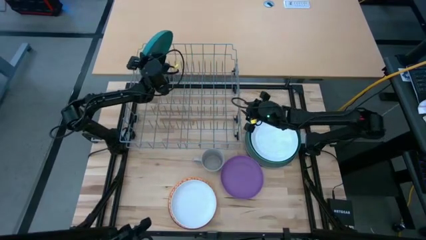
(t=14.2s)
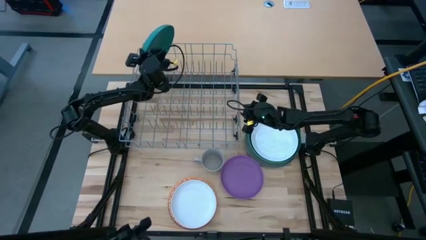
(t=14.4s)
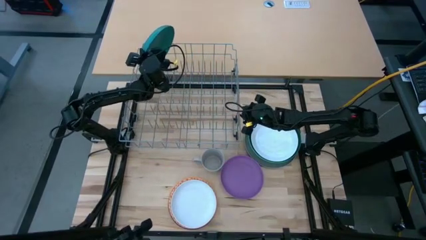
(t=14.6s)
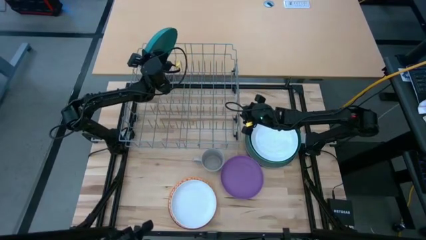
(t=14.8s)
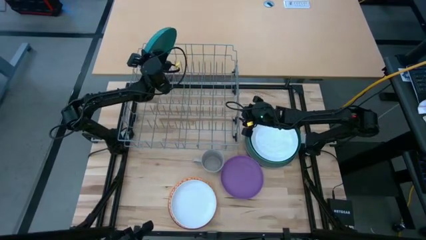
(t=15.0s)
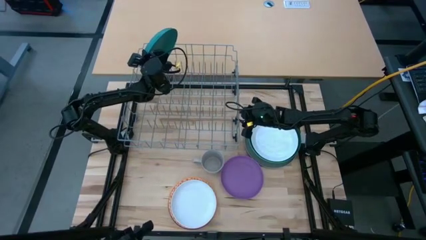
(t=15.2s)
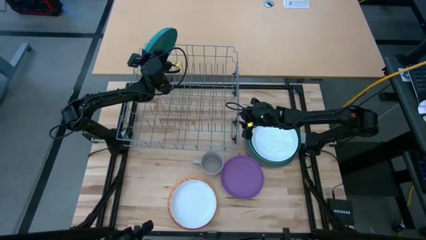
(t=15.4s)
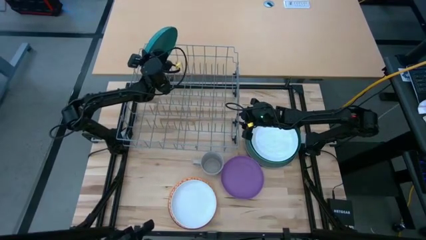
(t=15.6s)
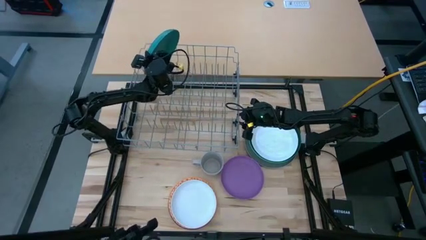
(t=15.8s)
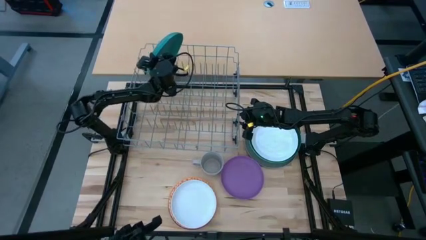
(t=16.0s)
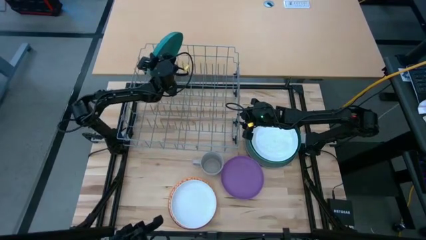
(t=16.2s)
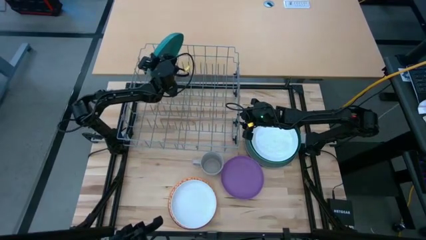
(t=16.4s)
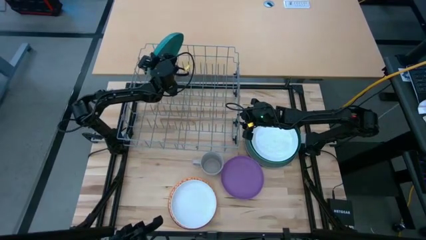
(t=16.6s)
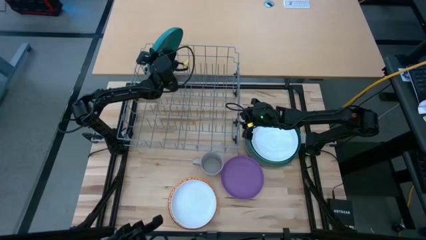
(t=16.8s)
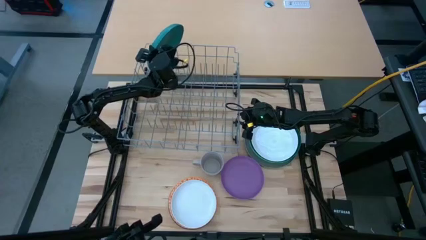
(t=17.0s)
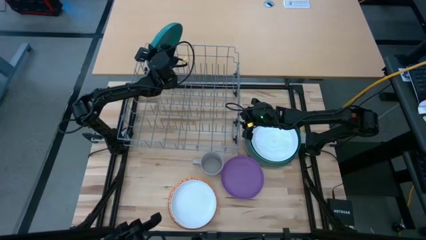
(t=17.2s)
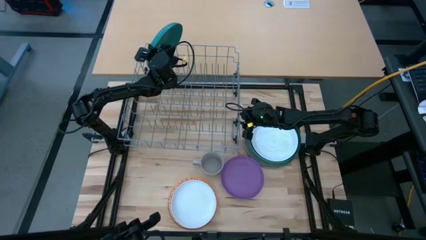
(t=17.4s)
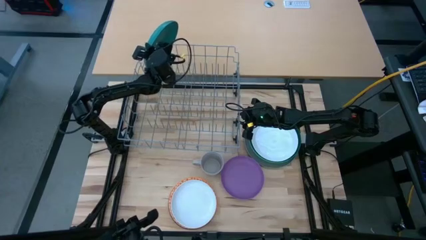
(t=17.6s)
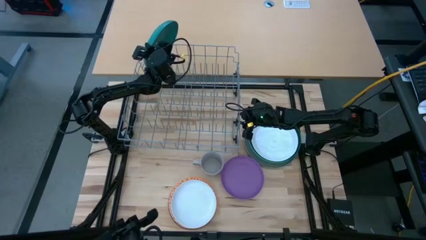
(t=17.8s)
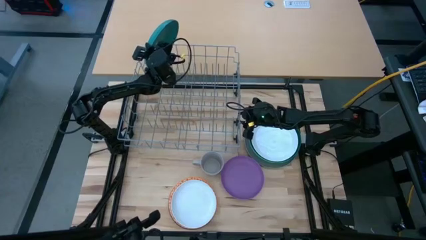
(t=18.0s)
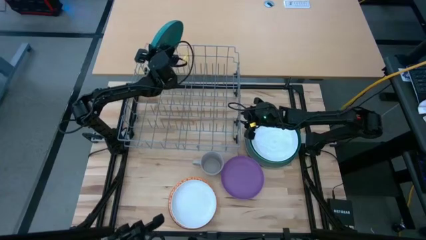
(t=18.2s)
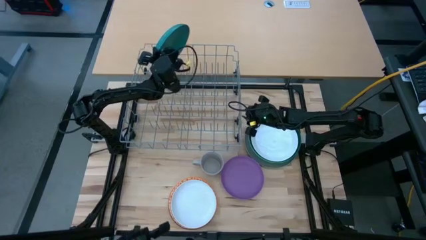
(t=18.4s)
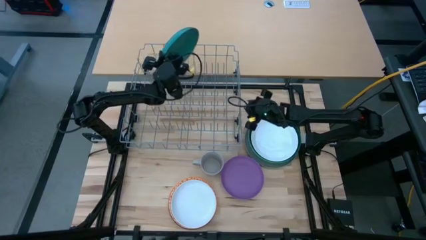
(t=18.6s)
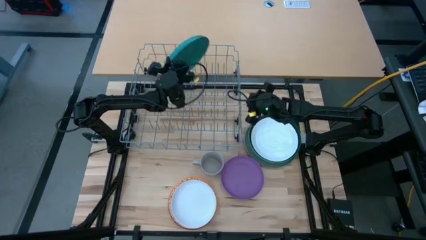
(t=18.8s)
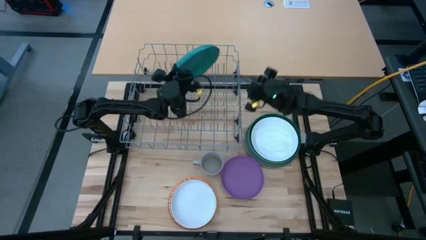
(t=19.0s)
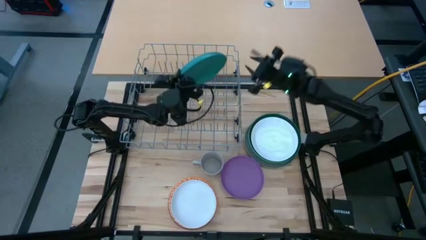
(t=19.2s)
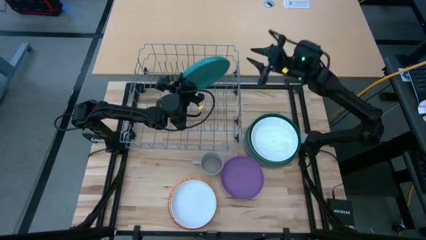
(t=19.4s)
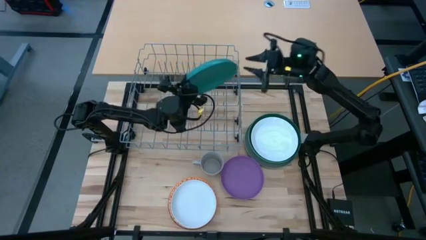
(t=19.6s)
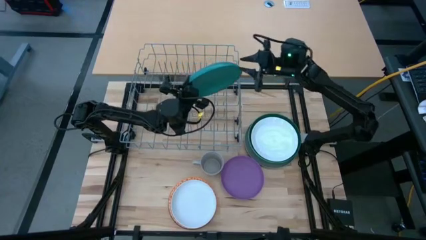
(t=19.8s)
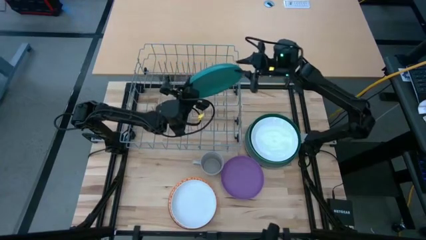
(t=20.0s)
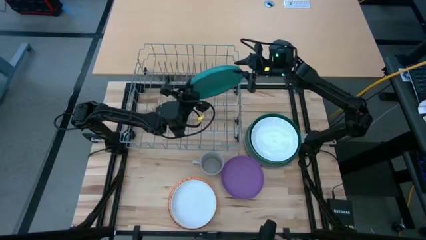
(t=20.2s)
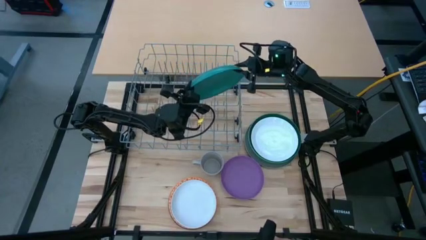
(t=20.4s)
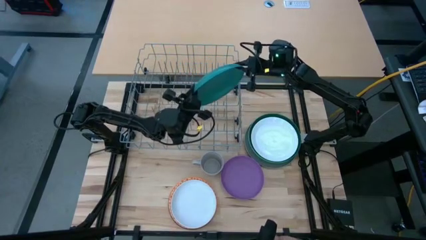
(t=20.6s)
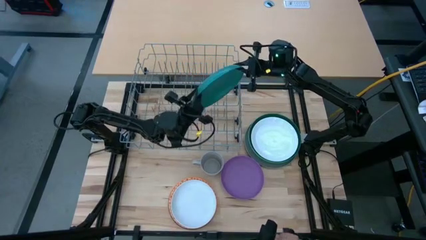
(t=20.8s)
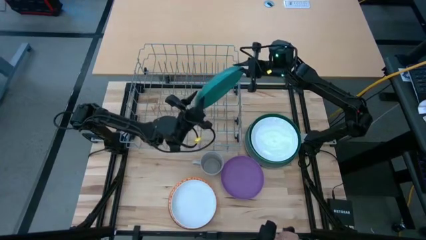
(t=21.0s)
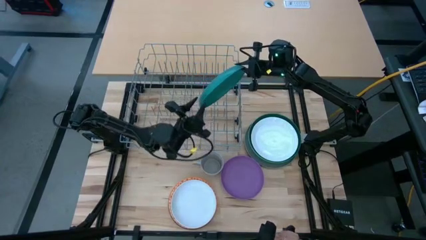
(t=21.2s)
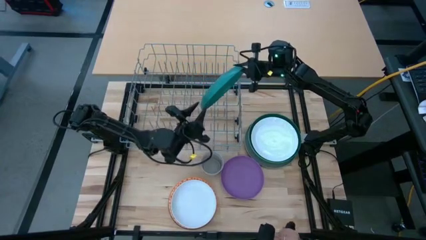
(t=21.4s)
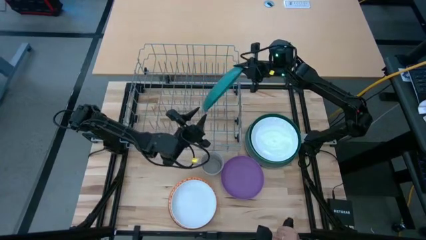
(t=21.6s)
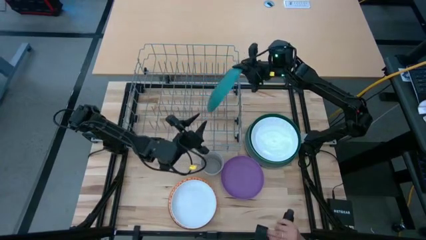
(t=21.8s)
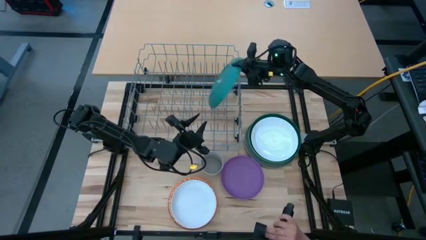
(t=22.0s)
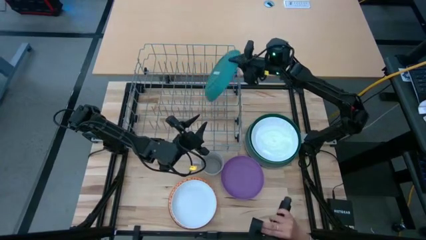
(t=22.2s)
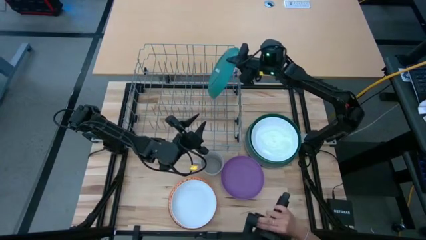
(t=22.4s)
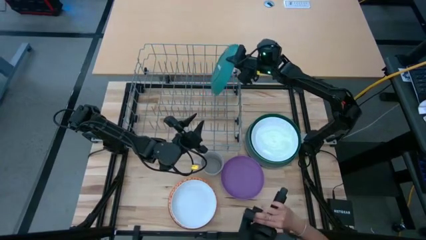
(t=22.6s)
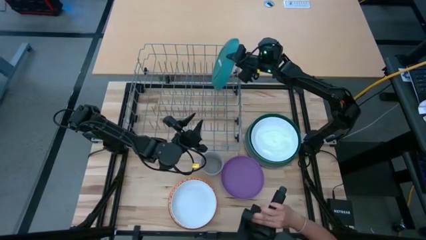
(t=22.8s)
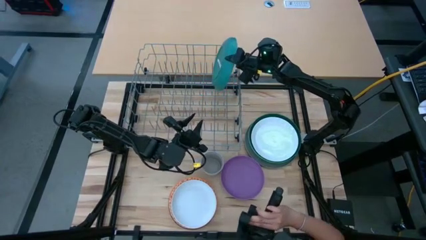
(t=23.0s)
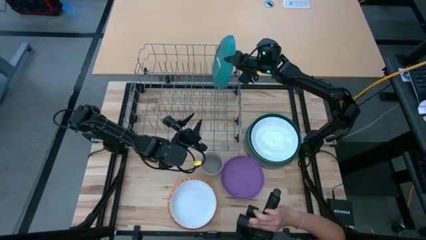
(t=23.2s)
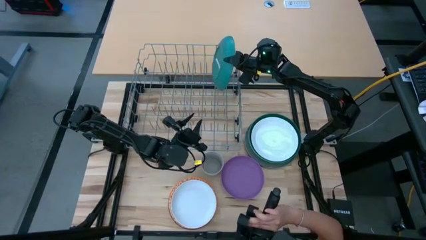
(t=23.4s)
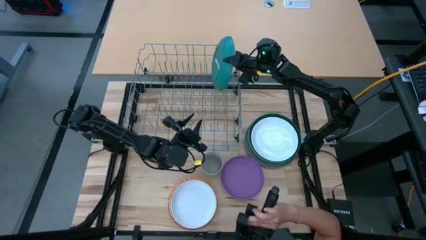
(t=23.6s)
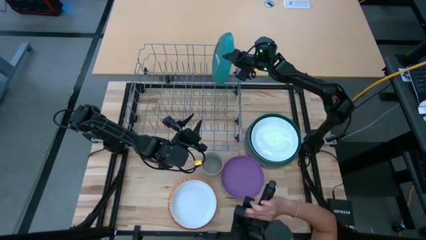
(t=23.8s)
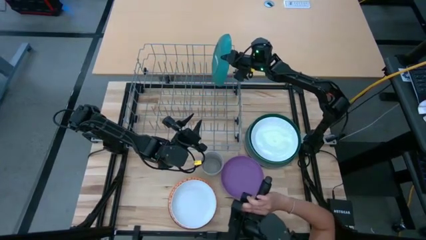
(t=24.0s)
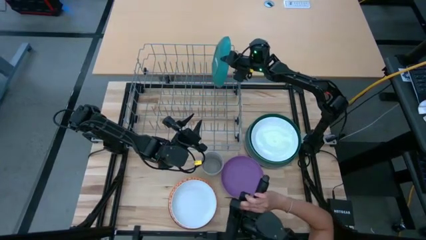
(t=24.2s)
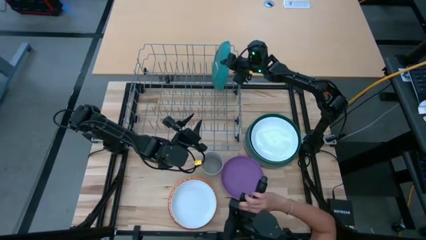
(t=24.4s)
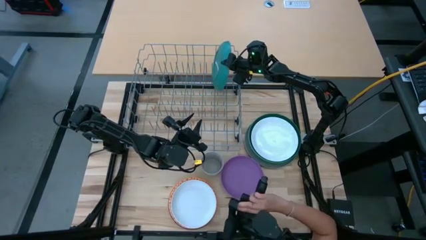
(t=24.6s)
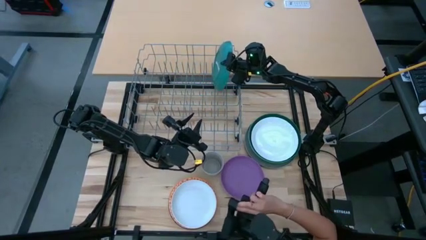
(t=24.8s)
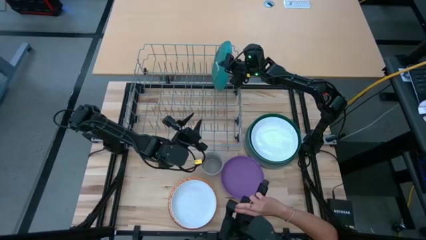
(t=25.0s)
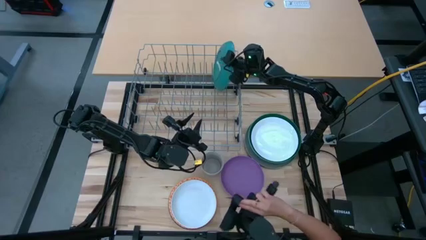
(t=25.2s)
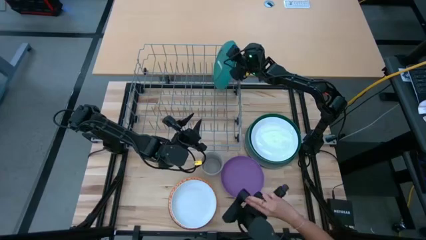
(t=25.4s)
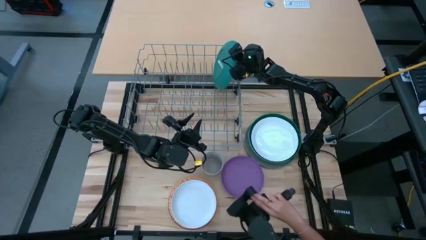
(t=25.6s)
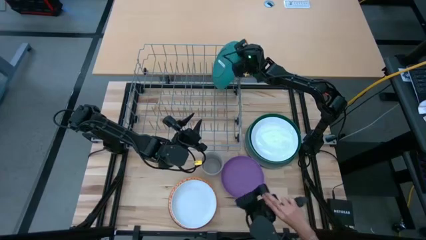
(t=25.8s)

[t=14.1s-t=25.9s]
Task: Sort dishes
Put the blue plate in the dish rack
